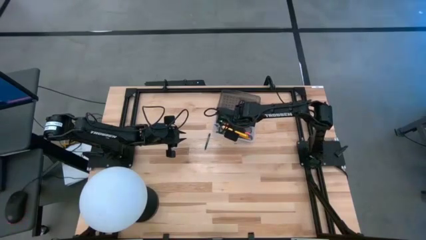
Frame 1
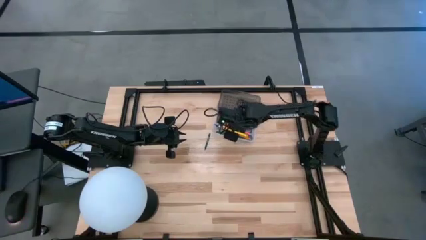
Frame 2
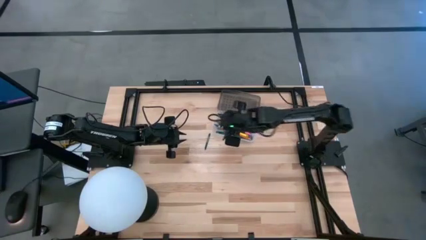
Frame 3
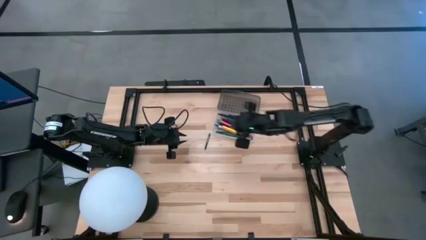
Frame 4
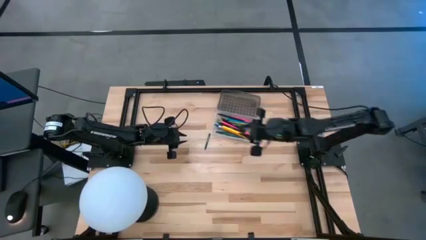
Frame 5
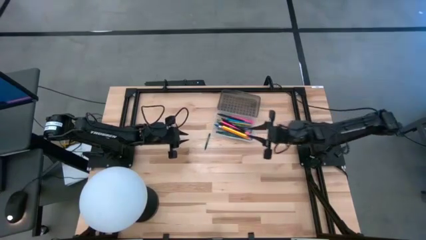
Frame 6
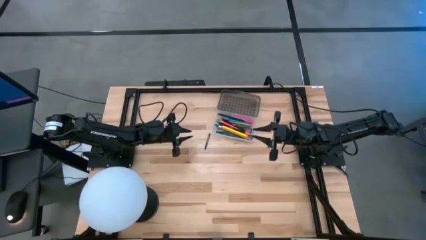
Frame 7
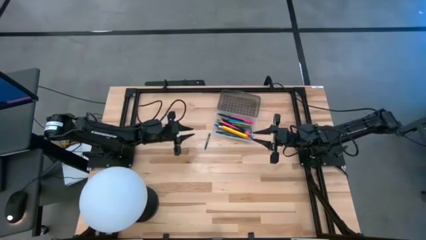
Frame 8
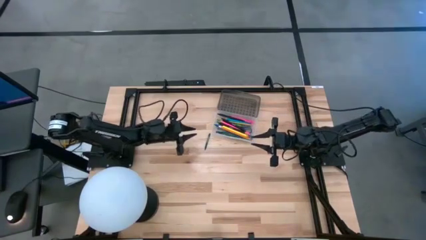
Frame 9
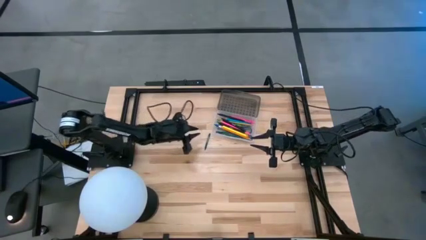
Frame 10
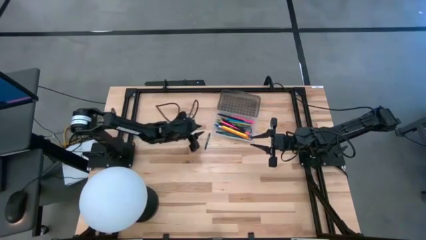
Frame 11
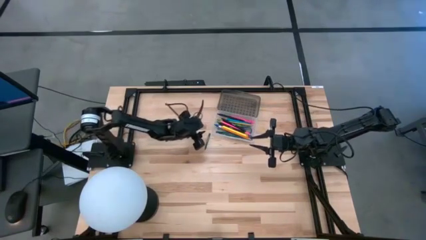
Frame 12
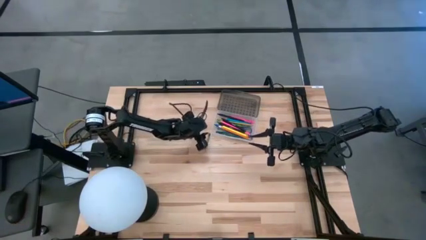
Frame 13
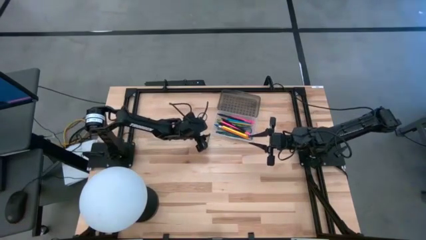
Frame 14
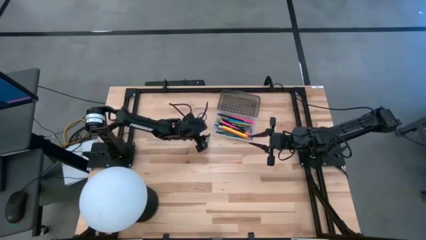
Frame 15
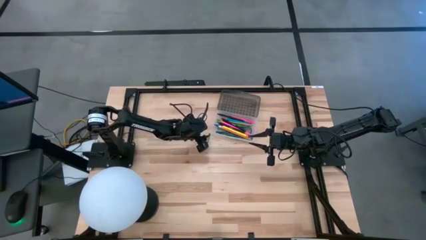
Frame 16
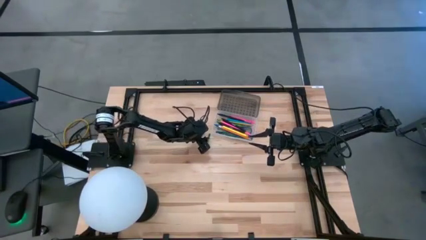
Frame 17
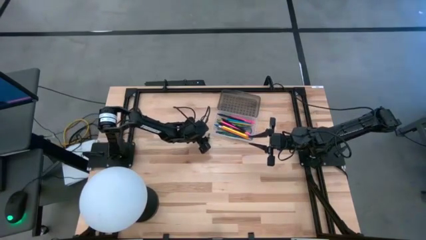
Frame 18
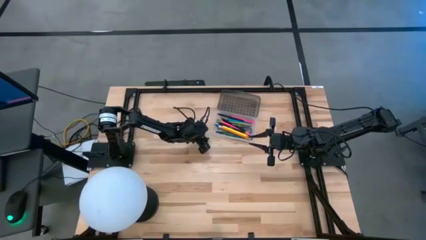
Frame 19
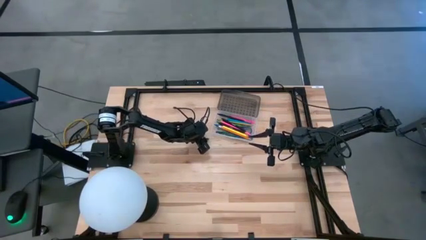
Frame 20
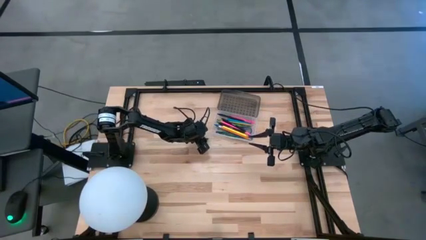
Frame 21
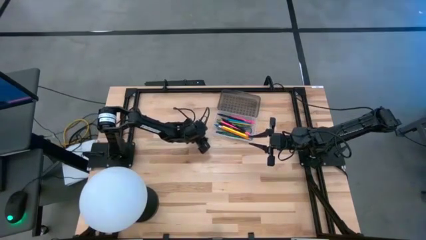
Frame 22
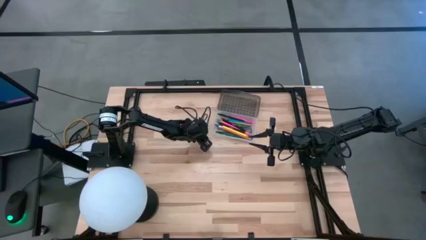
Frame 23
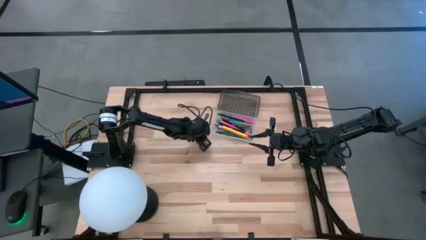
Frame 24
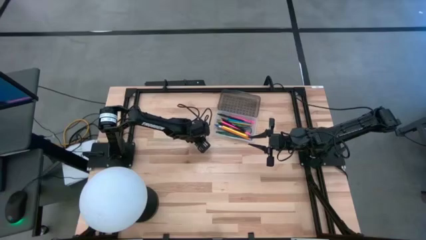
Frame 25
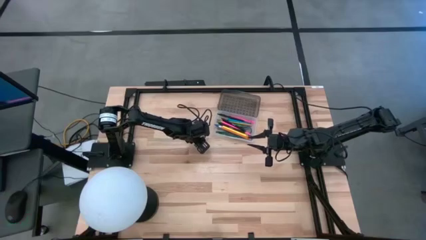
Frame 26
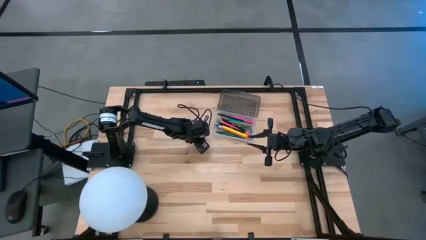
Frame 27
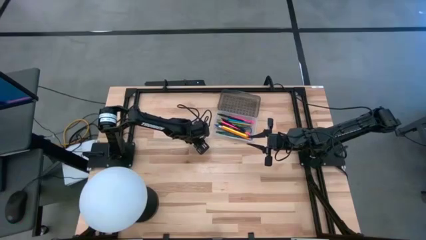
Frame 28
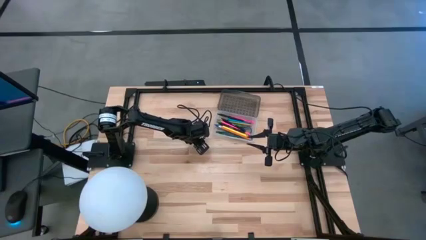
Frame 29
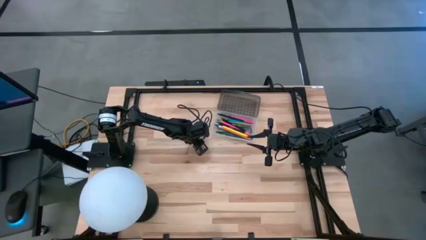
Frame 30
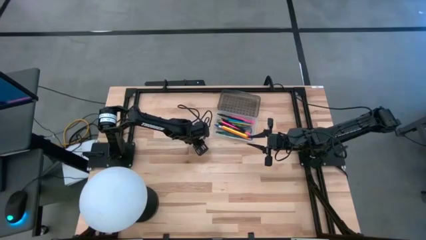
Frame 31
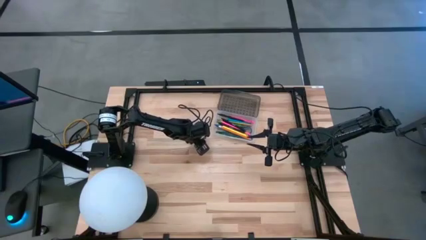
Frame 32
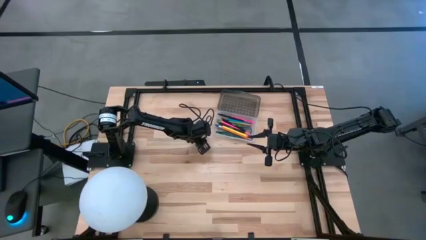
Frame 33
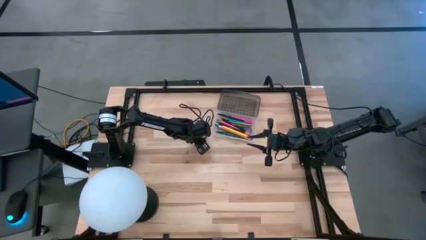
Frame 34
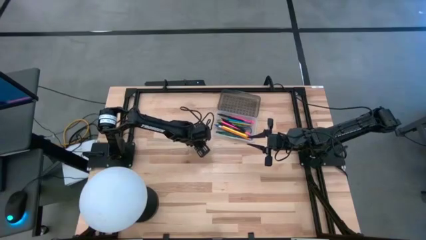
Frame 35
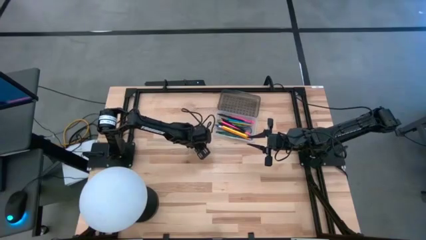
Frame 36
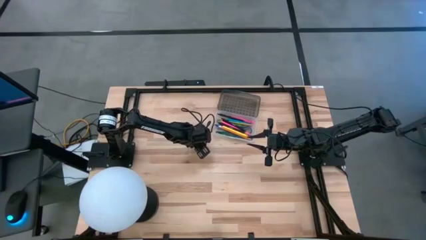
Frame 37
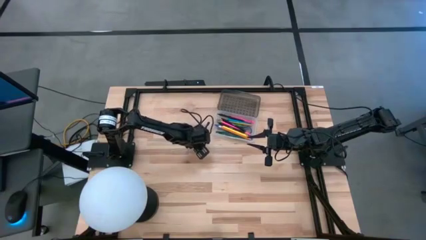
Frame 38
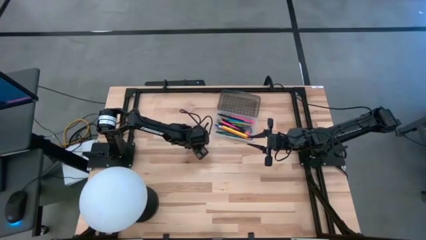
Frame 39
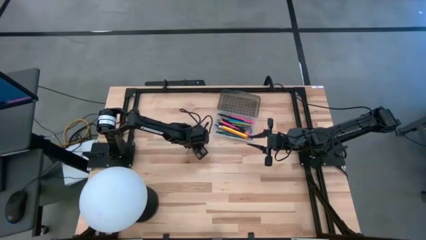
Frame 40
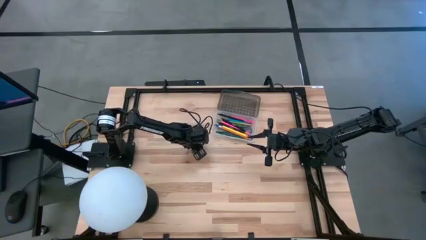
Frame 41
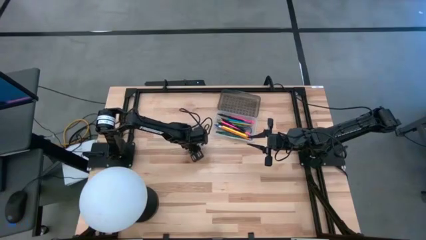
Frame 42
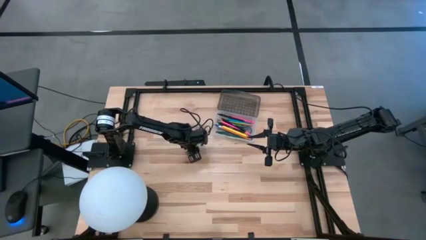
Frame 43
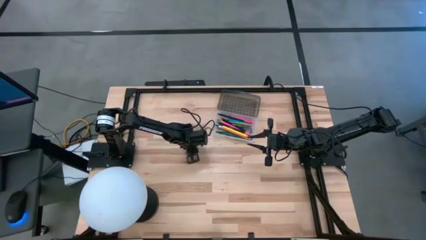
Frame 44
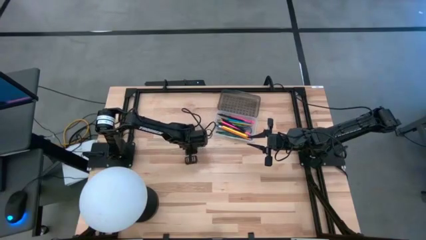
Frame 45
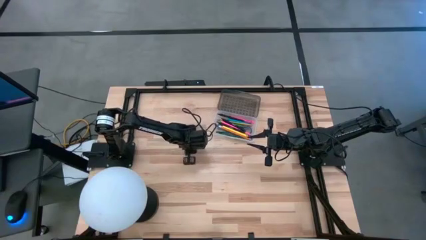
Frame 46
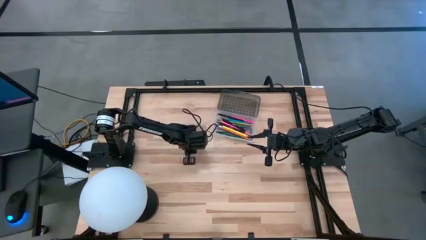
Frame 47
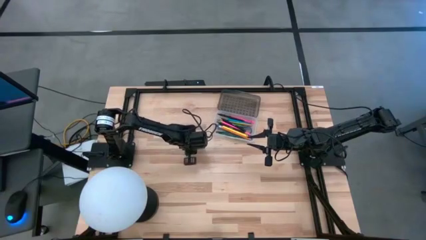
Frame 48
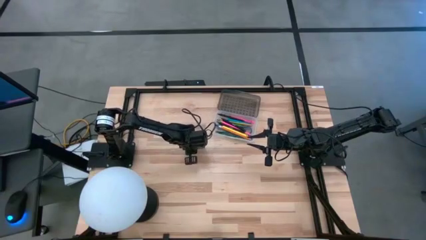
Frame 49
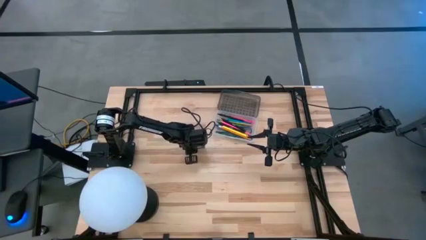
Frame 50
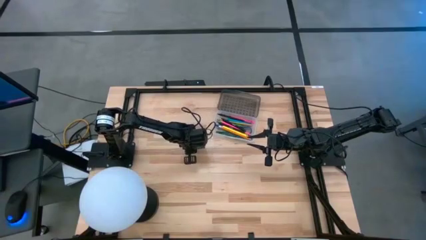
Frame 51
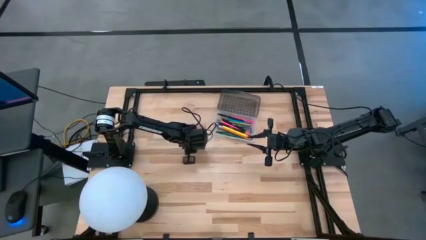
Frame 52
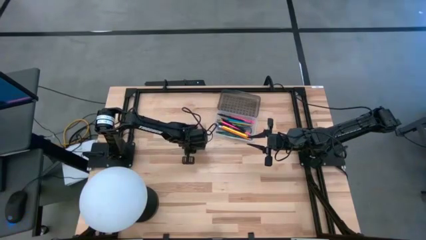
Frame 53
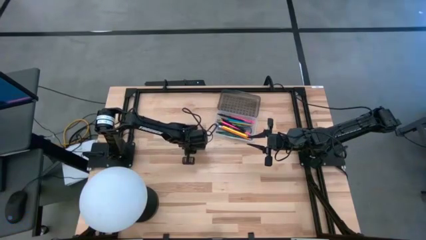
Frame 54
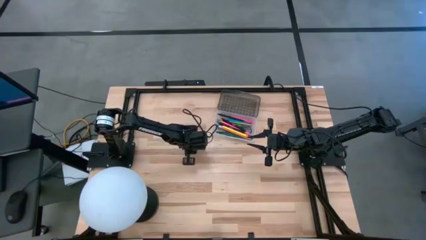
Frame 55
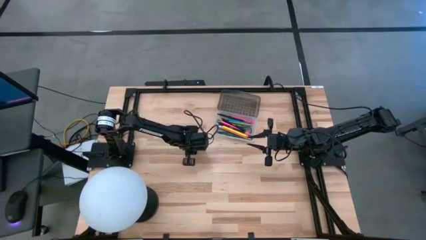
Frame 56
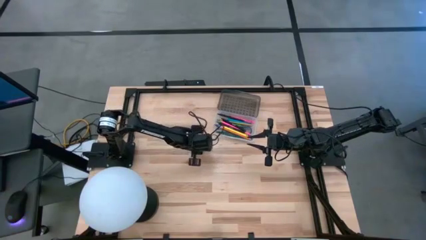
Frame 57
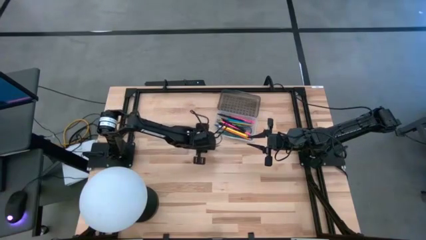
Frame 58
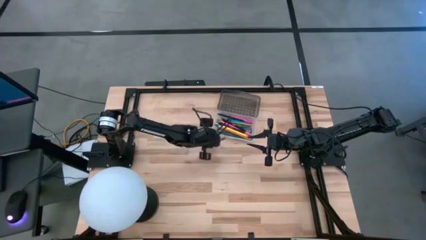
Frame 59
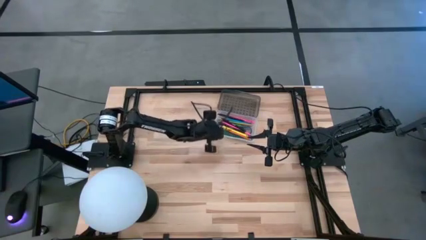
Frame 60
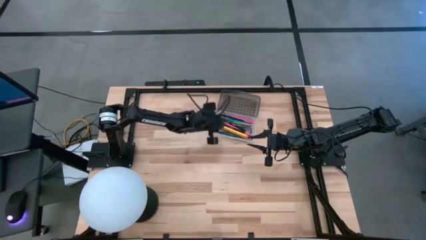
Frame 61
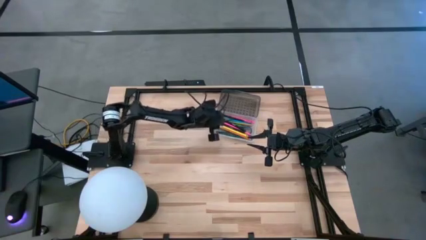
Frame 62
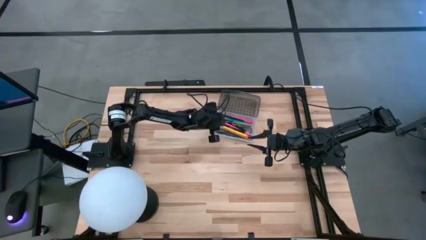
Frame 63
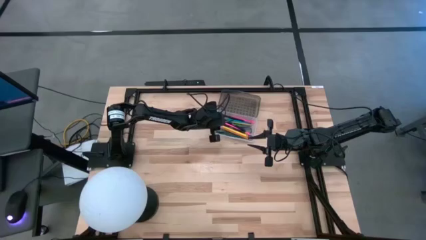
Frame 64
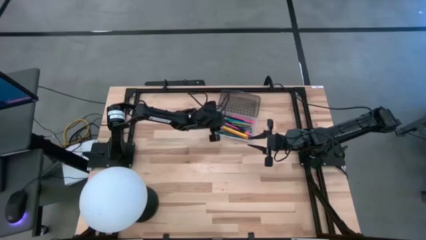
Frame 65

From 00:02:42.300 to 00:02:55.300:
Task: Pick & place school supplies into a supply box
Put the green crayon into the black supply box

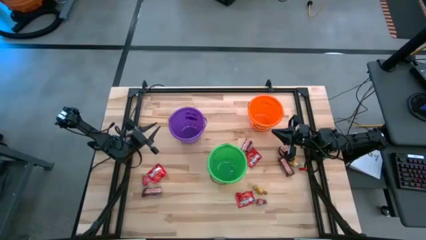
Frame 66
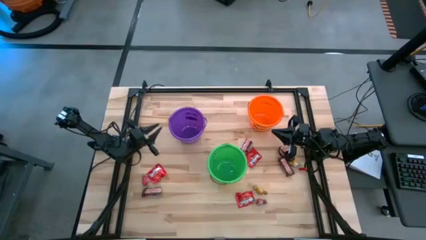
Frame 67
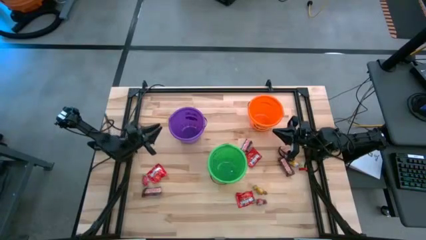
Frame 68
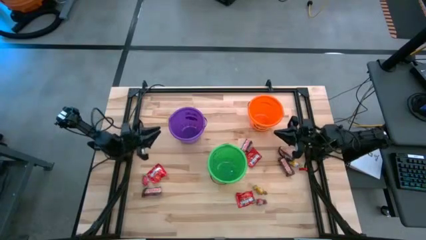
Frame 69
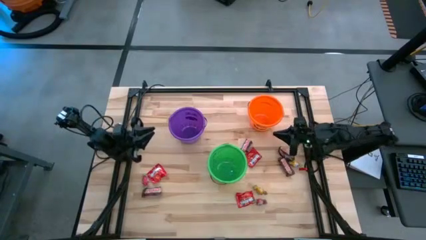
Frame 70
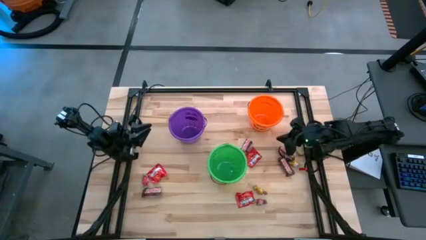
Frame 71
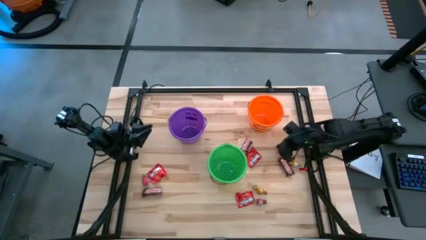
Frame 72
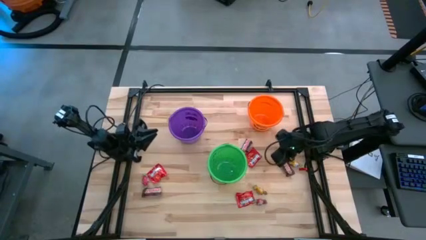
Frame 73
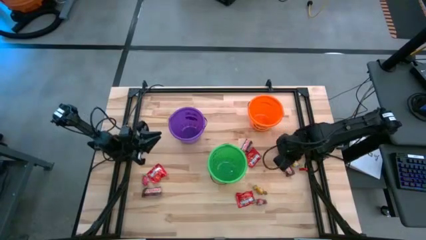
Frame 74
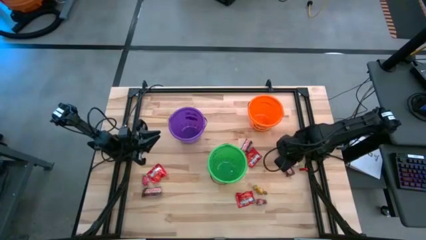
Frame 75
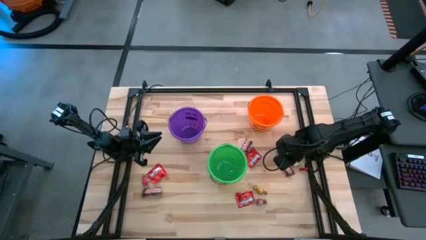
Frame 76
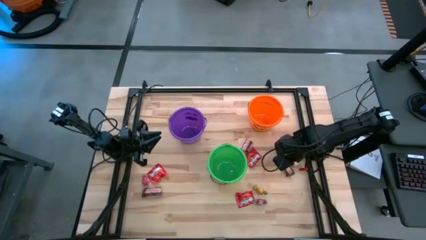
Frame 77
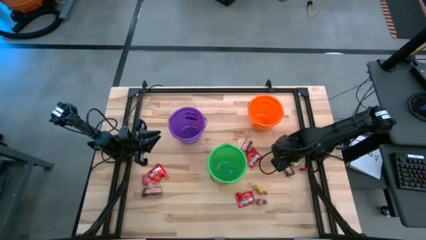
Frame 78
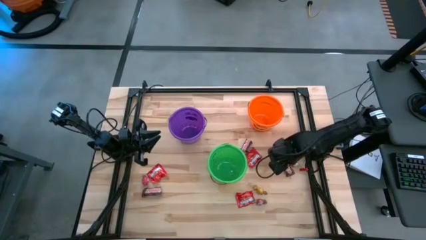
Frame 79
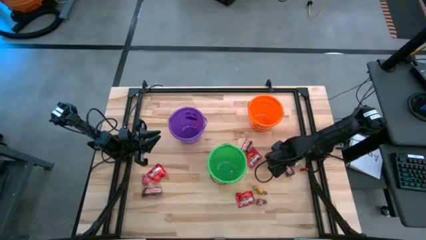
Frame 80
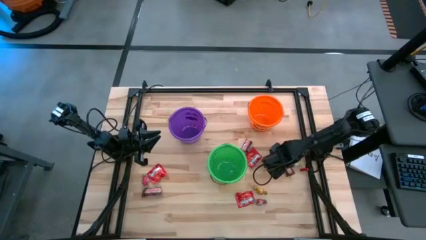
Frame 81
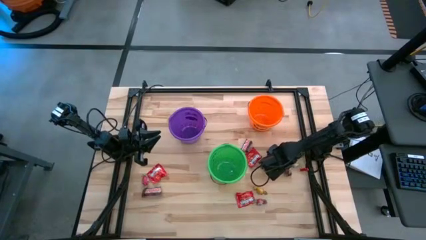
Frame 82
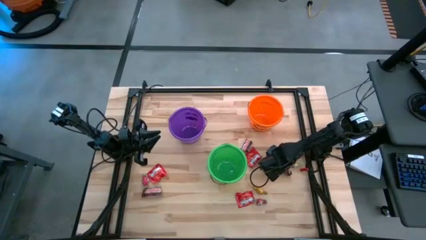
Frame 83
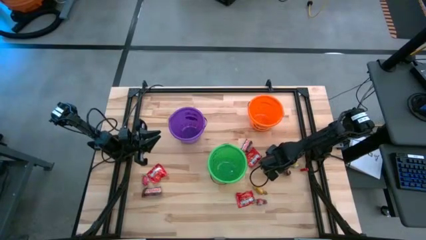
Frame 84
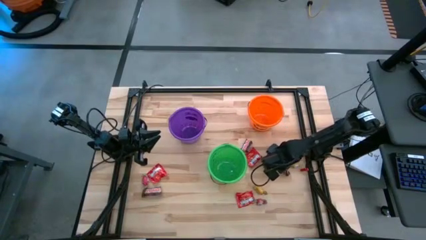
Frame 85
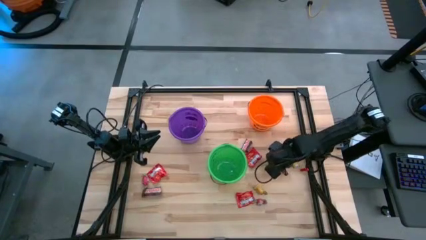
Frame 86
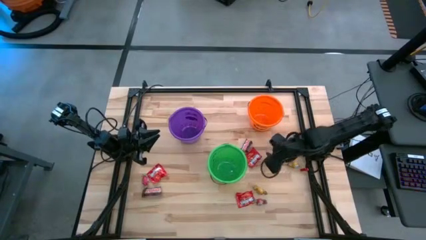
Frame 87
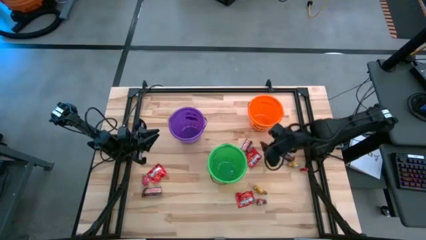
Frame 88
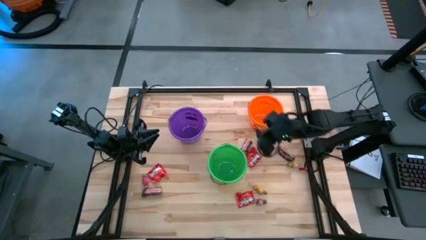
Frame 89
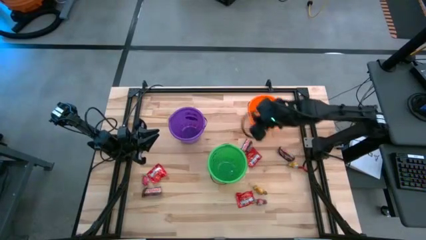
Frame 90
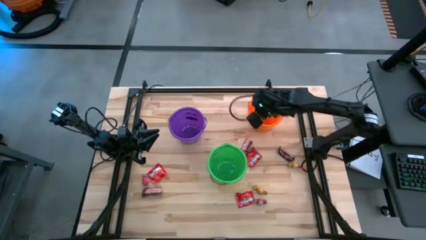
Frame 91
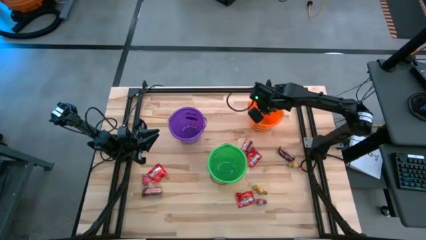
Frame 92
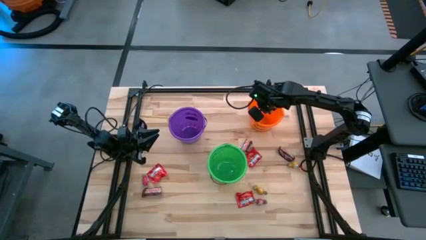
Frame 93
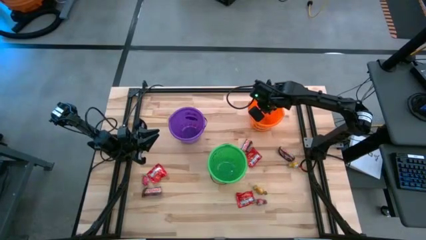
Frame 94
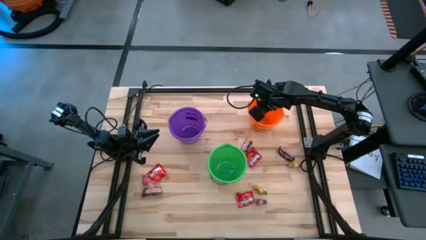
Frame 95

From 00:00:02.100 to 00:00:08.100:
Task: Organize candy in baskets
Put the brown chocolate bar into the orange bucket
